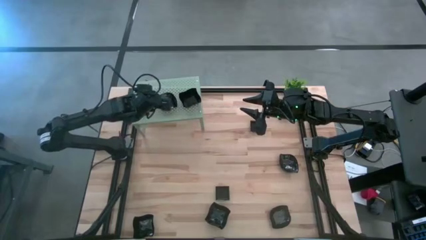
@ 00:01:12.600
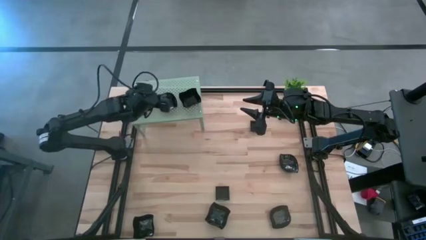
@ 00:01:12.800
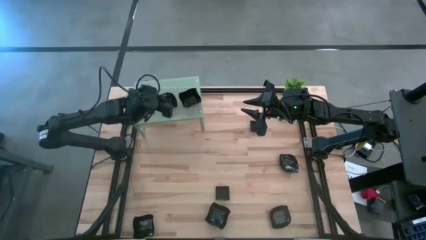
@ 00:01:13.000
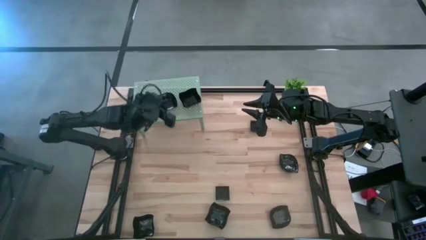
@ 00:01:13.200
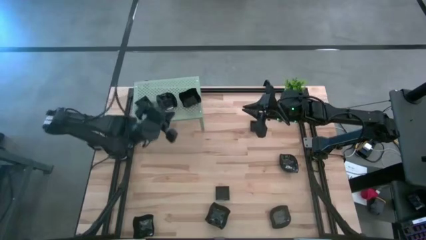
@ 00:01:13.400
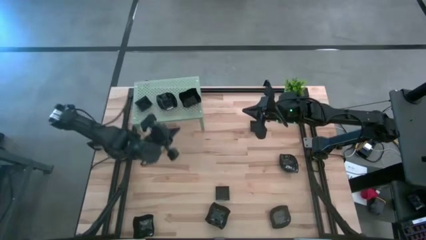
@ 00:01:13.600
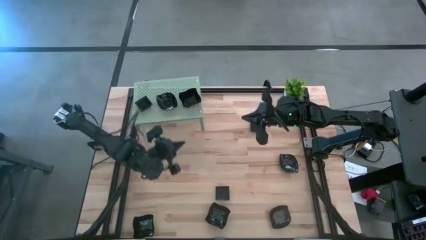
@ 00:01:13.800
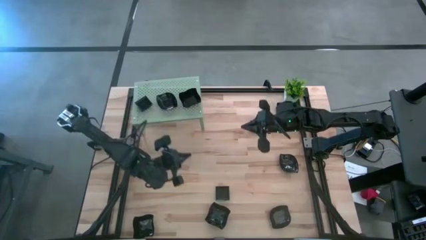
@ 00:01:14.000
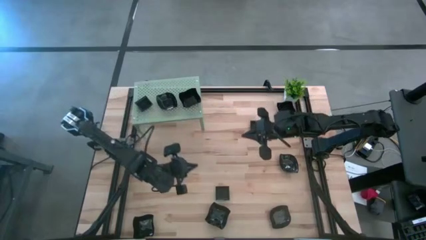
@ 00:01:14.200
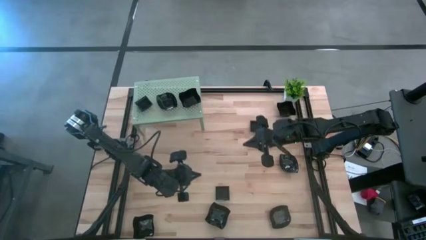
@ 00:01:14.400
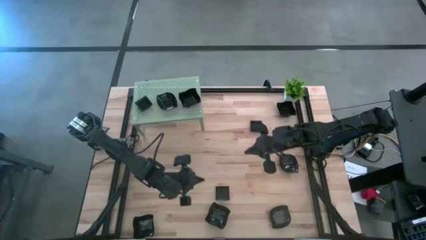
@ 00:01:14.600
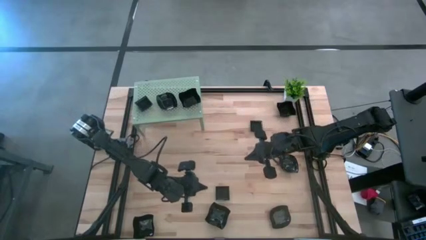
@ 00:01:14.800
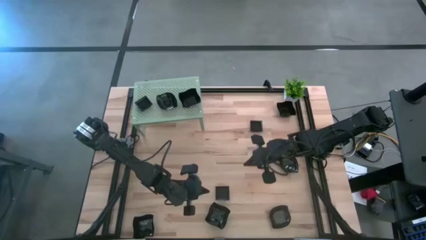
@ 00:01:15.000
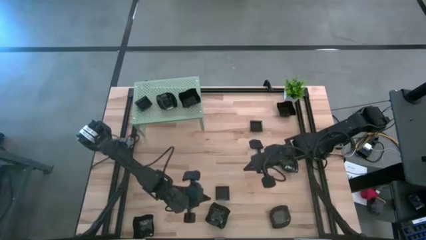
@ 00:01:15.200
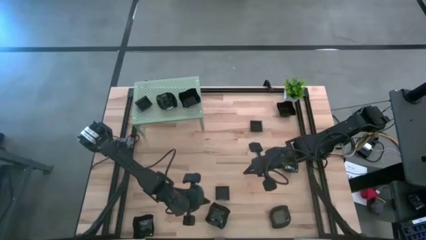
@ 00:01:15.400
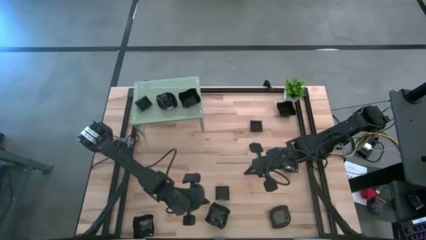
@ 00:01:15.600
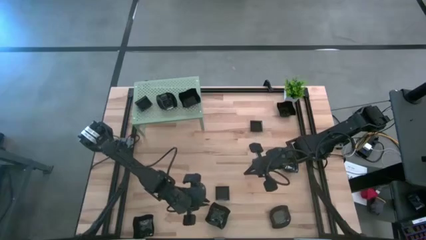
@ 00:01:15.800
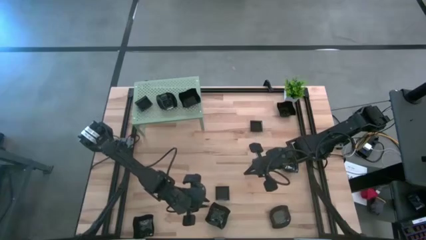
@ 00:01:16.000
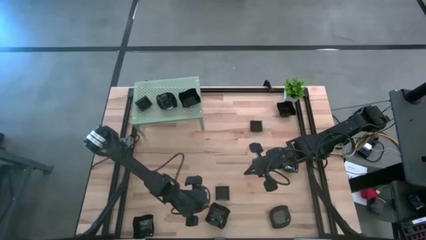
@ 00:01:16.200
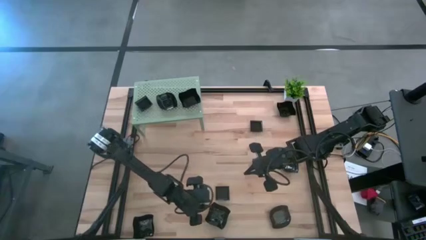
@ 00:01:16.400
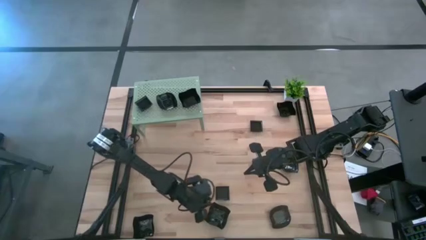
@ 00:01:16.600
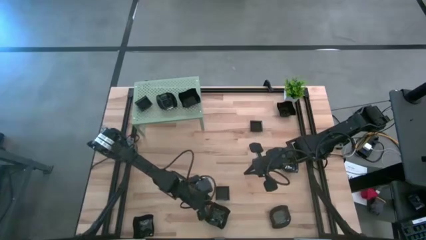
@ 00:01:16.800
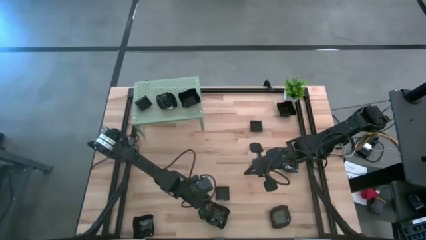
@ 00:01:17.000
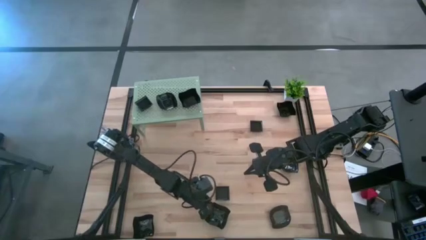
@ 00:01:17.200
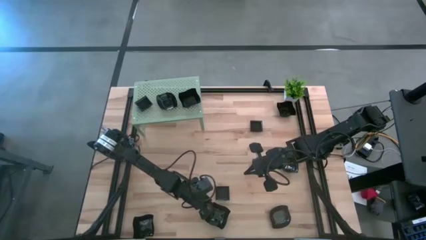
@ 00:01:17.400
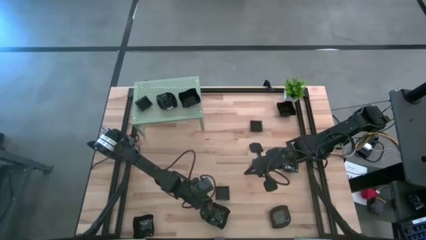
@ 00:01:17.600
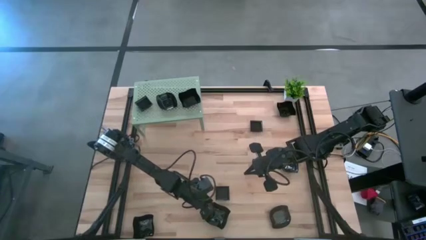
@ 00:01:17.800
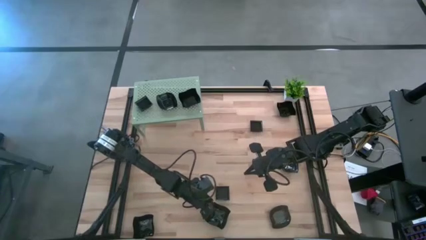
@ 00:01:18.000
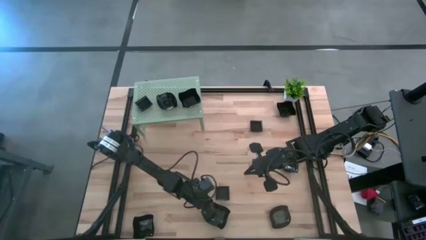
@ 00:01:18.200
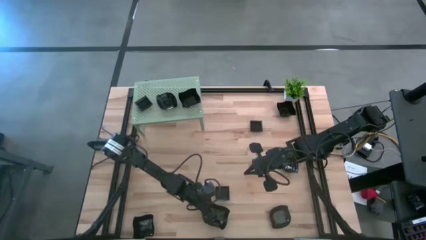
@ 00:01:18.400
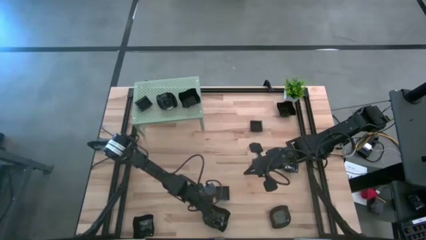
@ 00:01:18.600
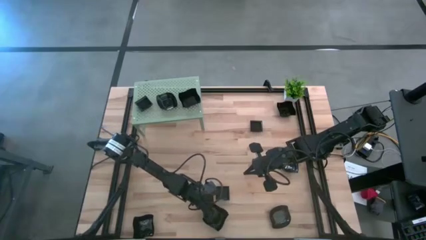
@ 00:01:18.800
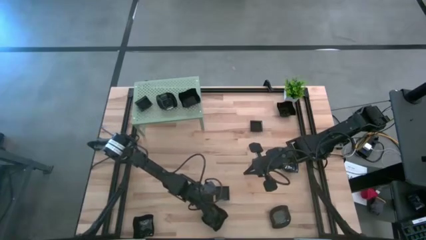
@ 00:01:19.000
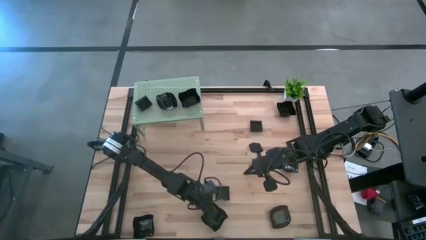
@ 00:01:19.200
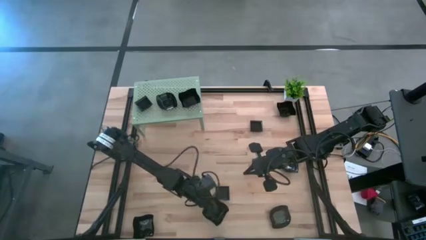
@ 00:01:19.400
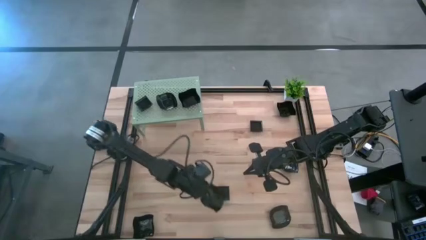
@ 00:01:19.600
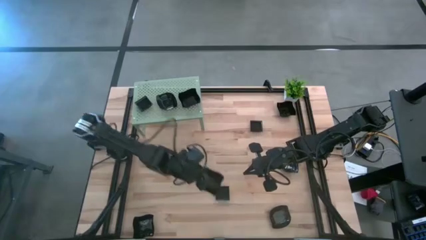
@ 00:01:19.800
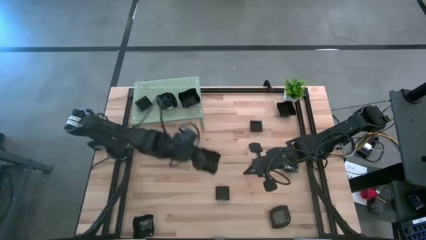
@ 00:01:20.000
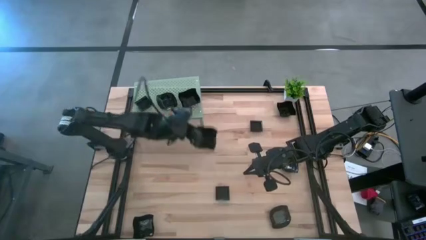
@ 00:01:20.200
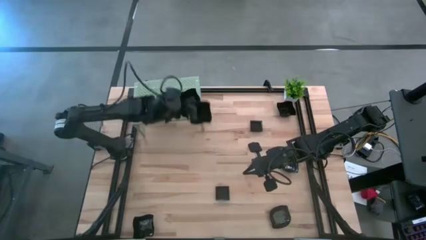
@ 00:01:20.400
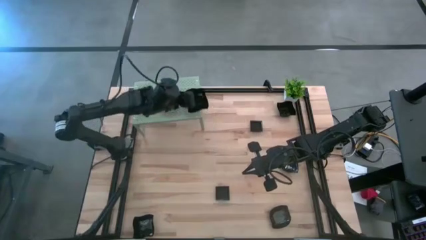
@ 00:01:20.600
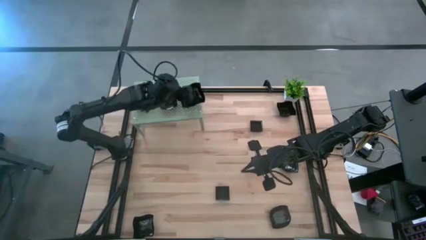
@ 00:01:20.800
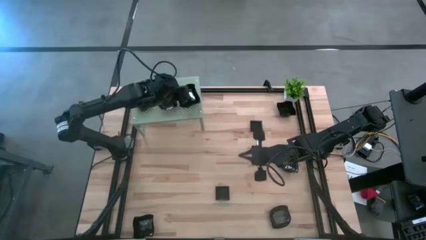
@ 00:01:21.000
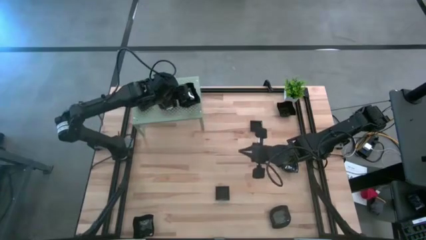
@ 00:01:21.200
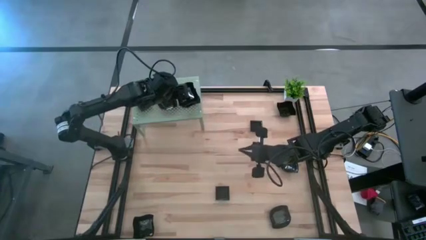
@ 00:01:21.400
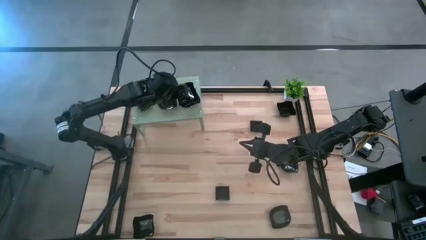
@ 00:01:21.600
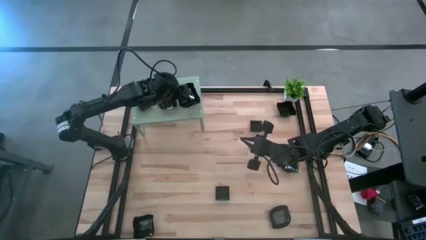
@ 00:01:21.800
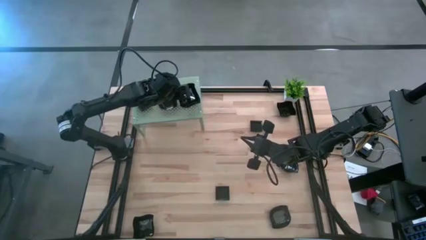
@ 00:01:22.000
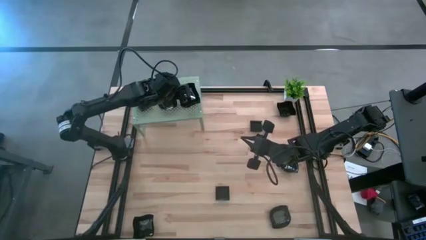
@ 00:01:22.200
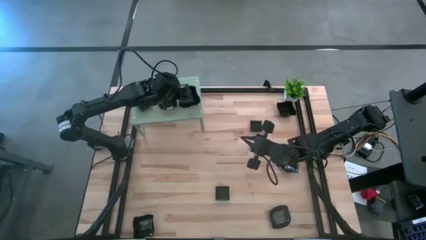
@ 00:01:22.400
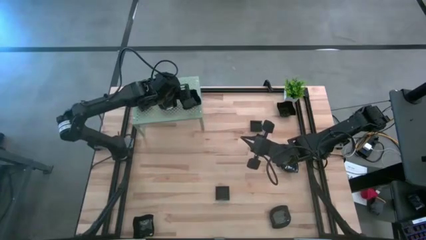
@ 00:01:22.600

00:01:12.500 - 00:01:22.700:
Task: Pick & Place Mini shaped plates
Stack the black wave square shaped plate on top of the wave square shaped plate on the shelf
